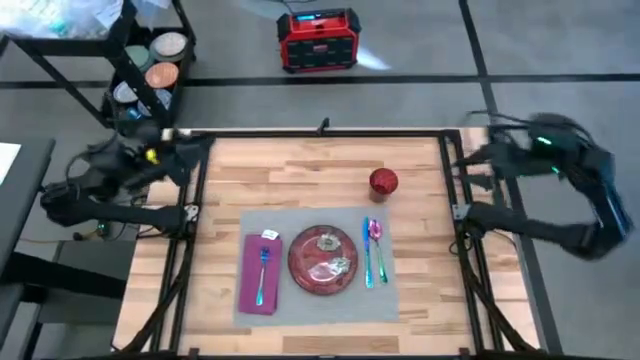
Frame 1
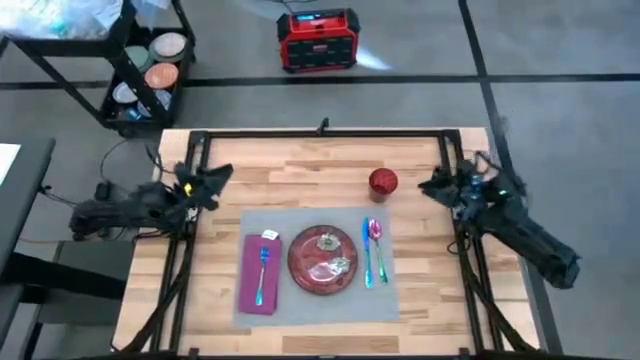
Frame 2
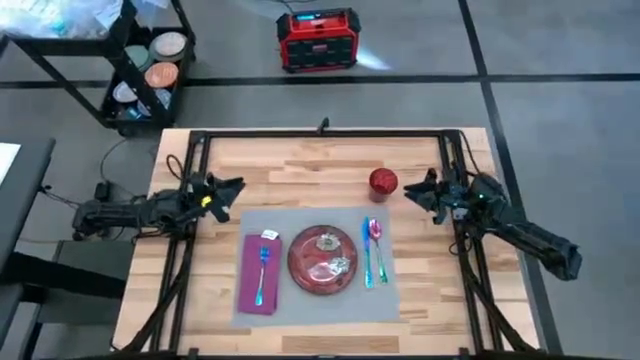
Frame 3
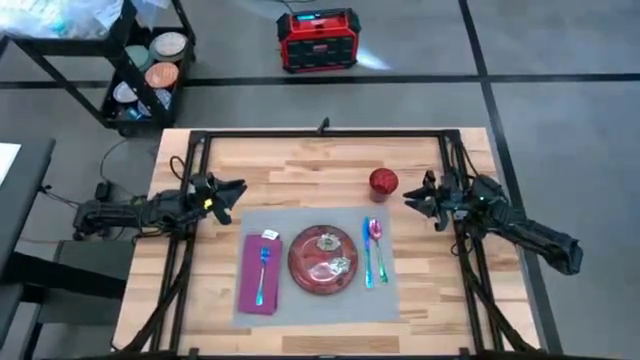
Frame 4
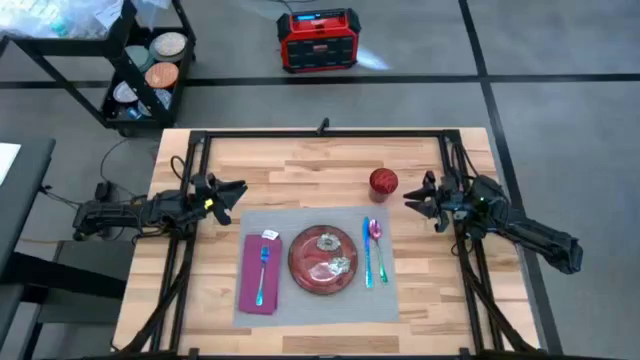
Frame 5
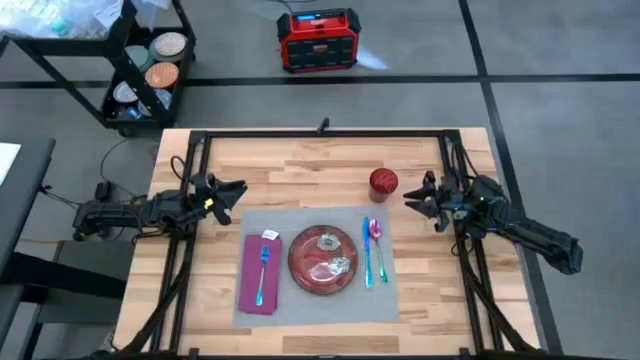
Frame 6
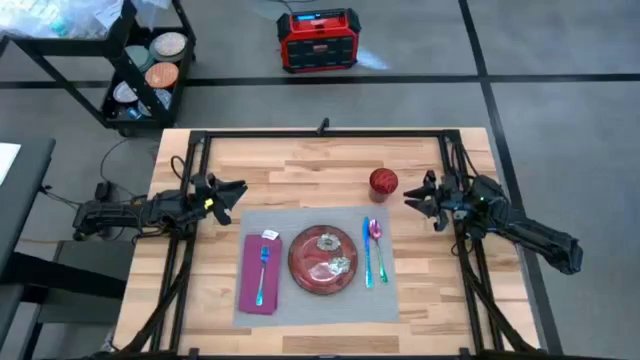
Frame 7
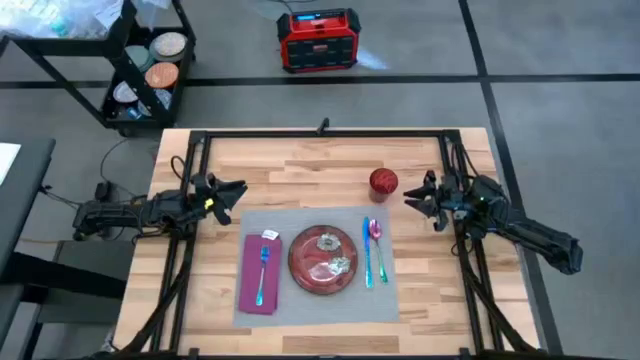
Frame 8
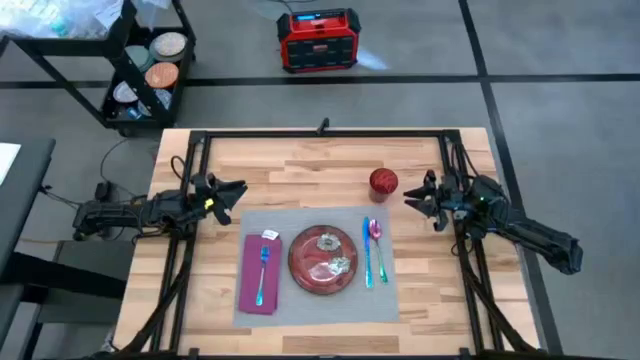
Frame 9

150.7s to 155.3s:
Task: Set table place
Return to Home Position

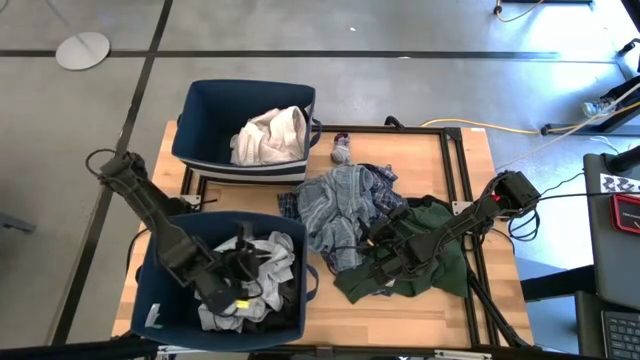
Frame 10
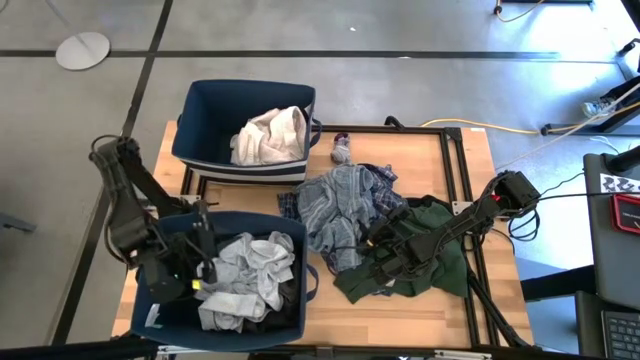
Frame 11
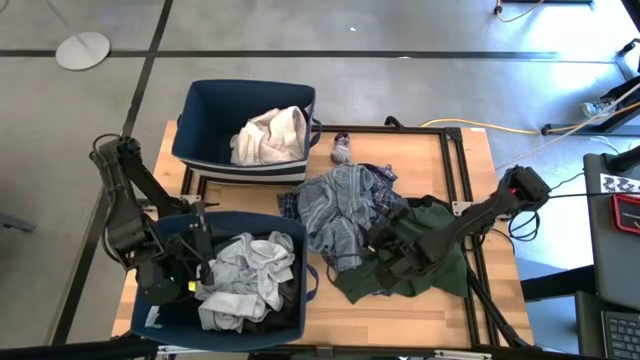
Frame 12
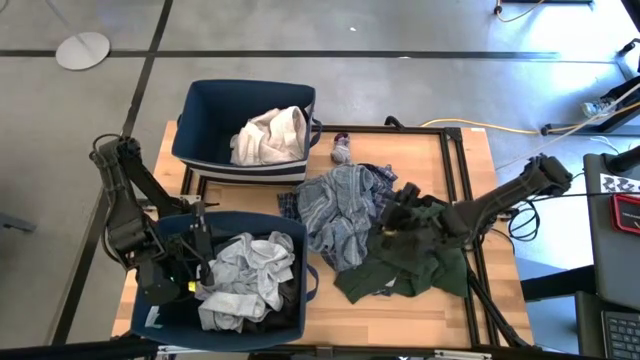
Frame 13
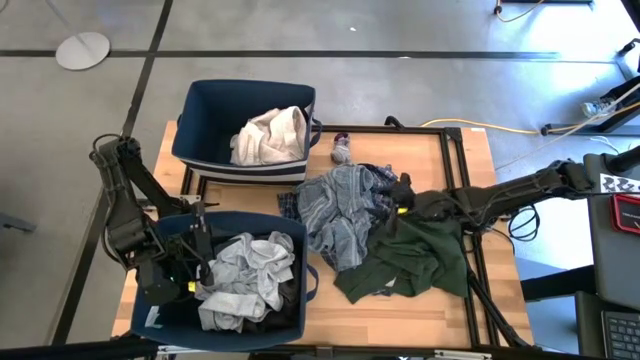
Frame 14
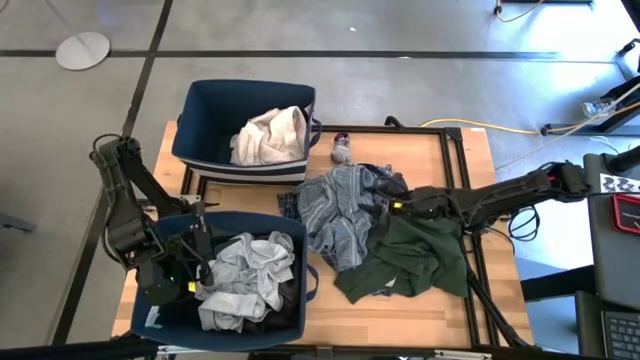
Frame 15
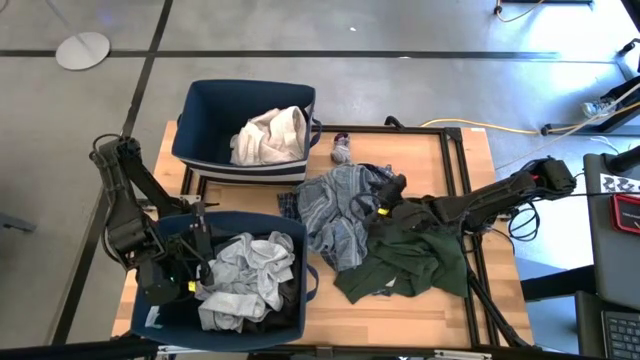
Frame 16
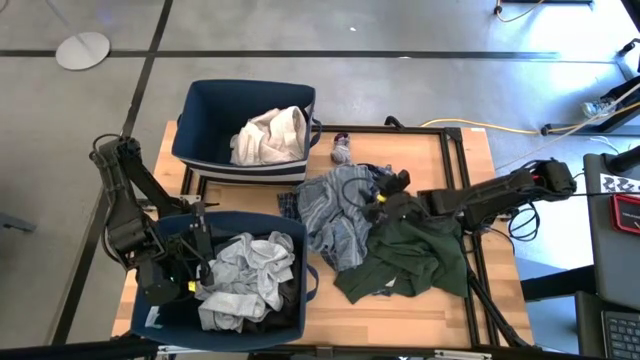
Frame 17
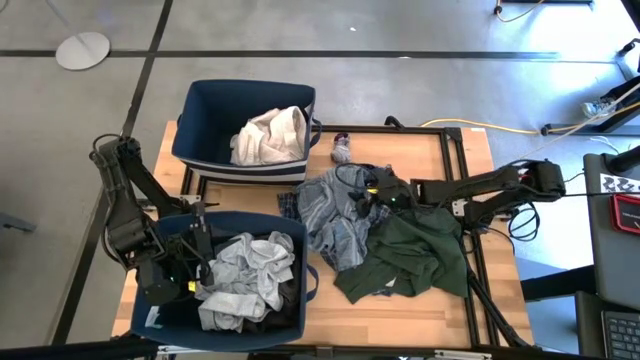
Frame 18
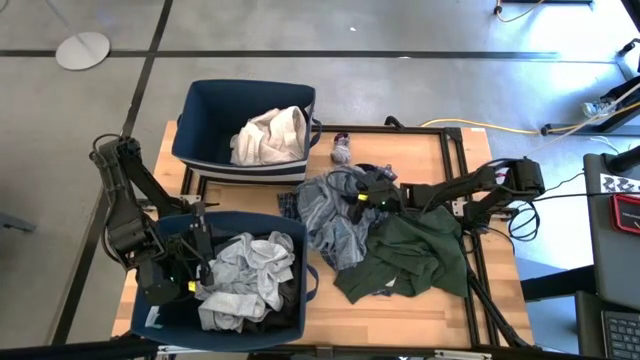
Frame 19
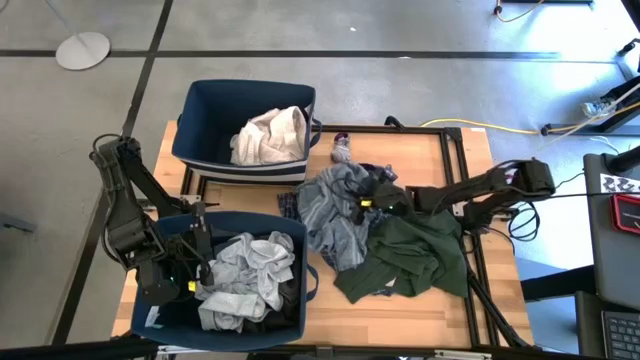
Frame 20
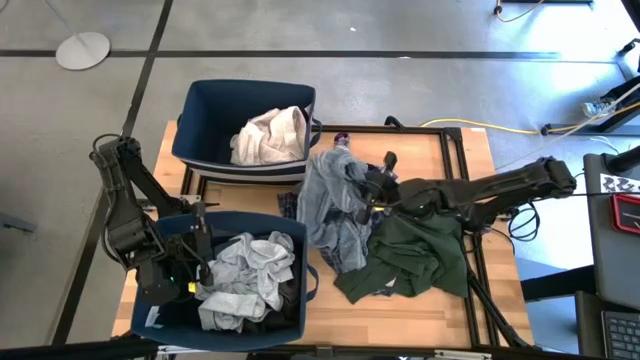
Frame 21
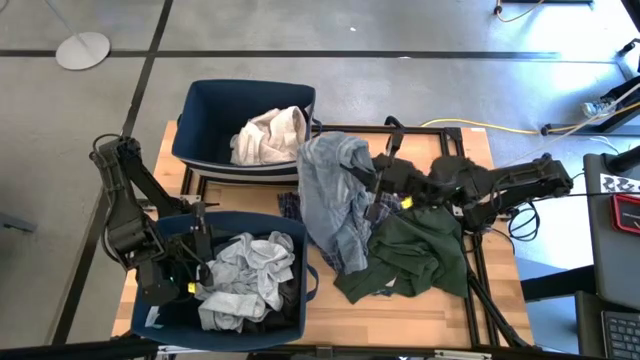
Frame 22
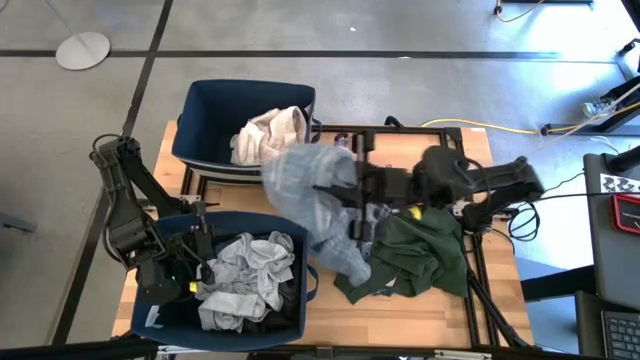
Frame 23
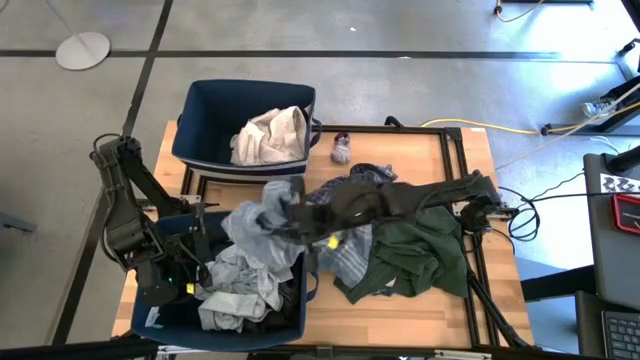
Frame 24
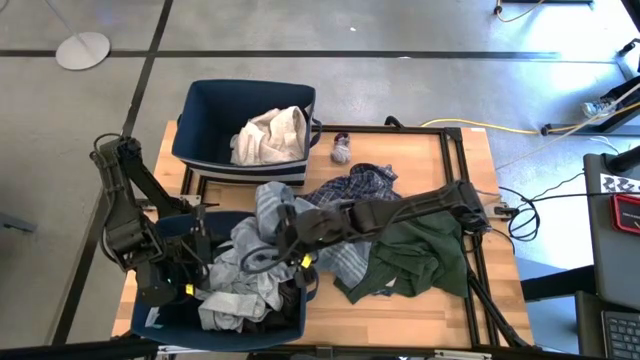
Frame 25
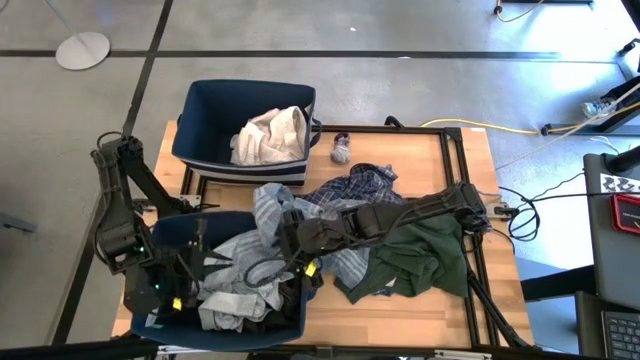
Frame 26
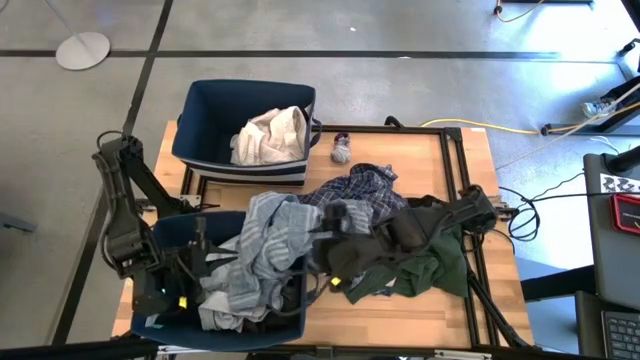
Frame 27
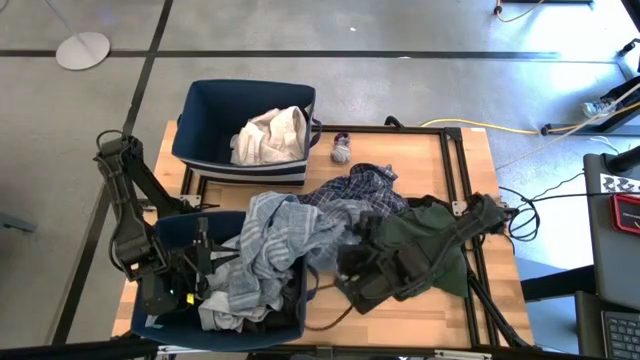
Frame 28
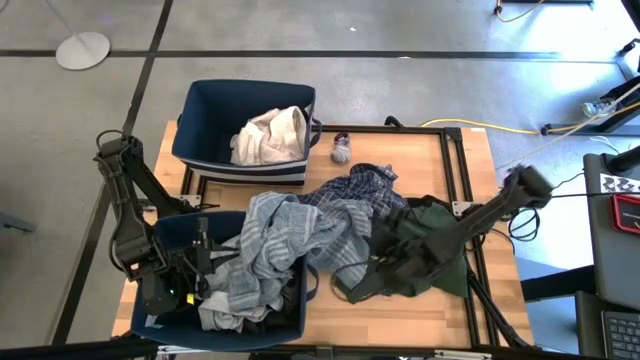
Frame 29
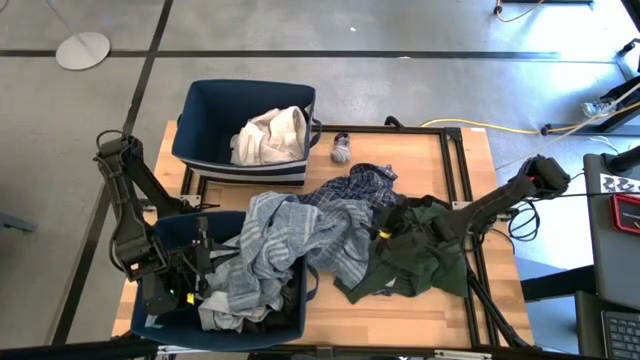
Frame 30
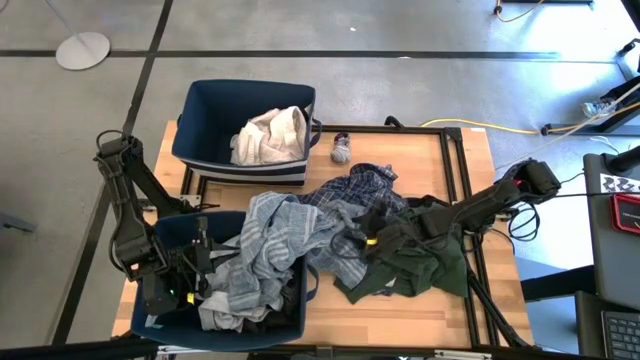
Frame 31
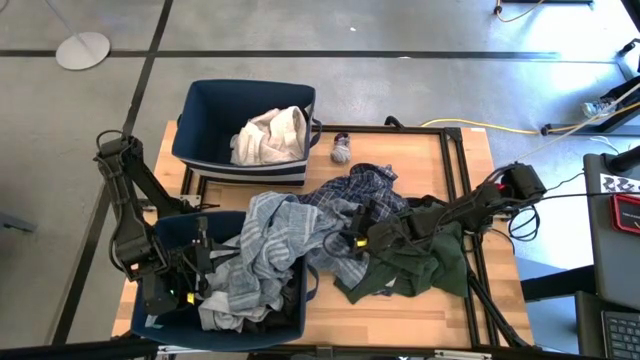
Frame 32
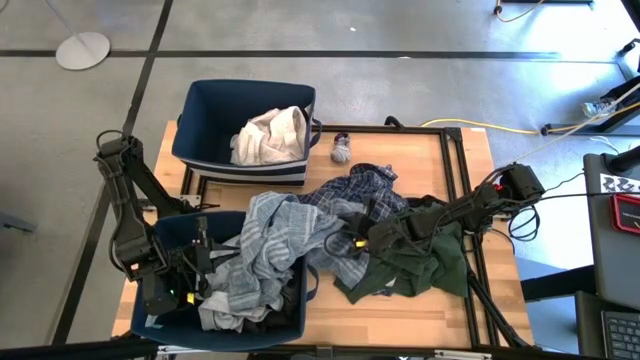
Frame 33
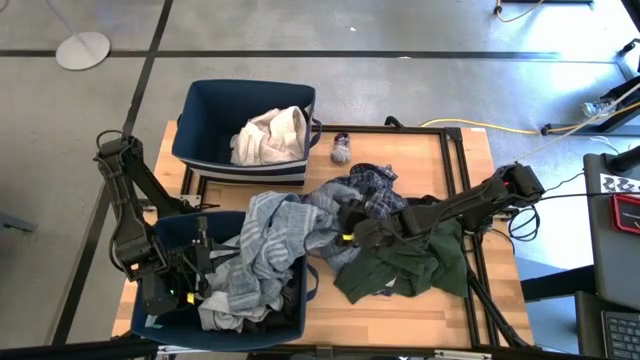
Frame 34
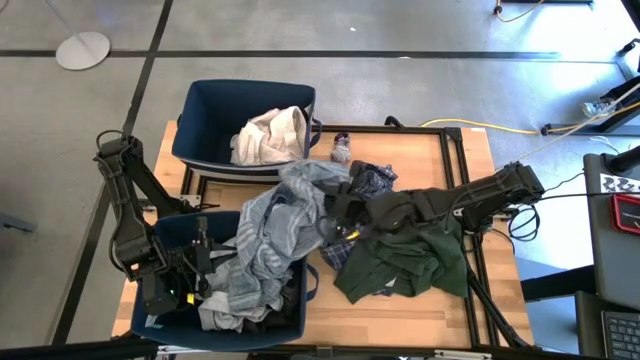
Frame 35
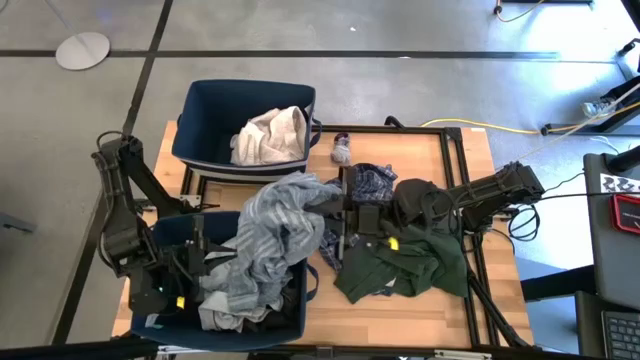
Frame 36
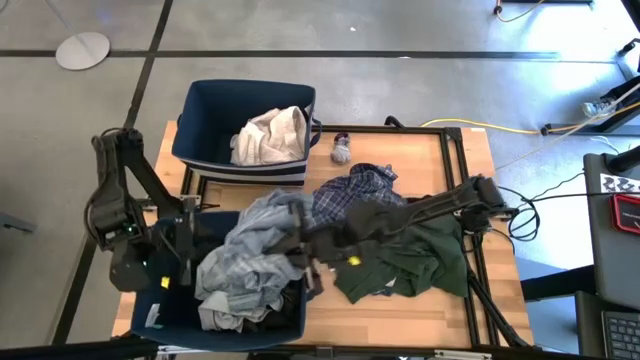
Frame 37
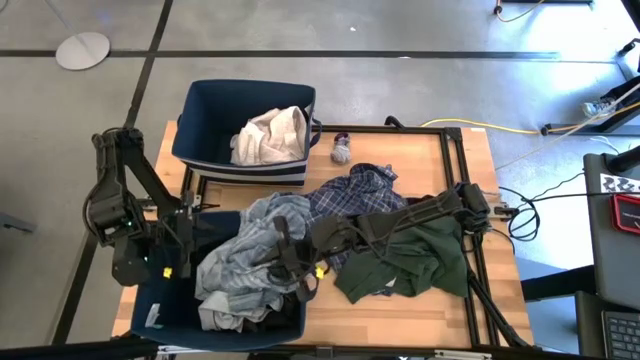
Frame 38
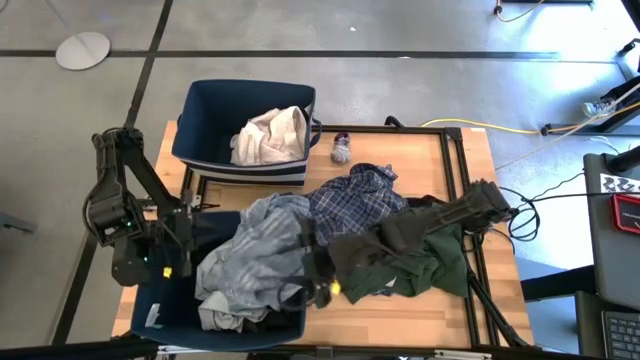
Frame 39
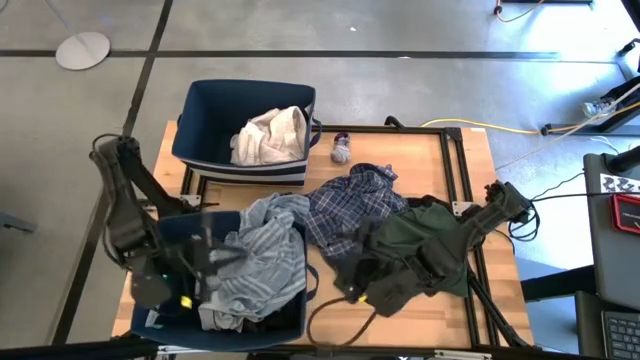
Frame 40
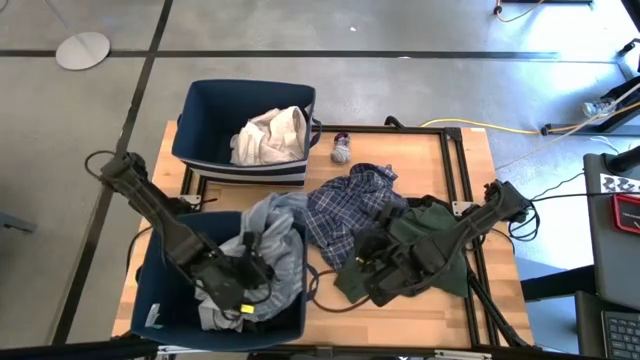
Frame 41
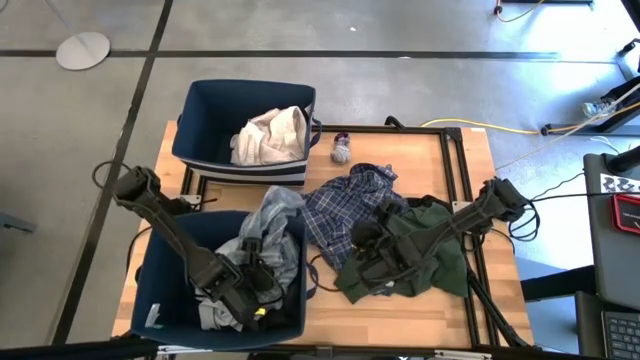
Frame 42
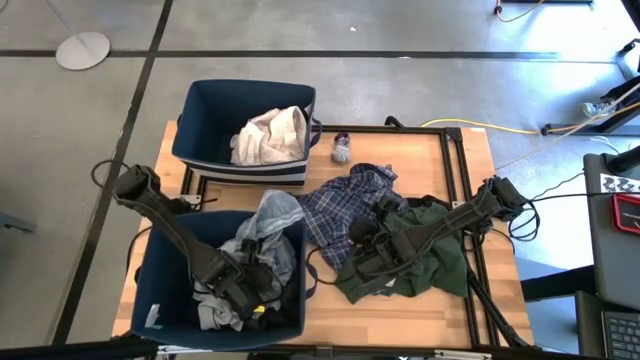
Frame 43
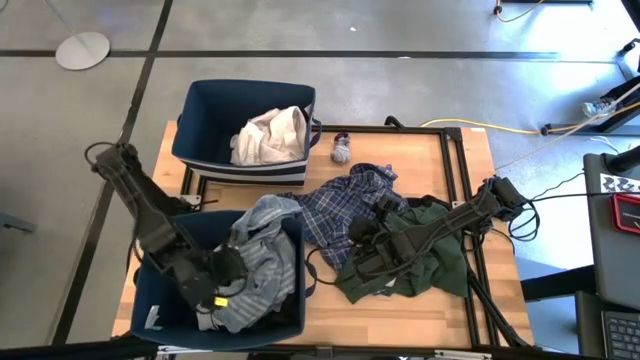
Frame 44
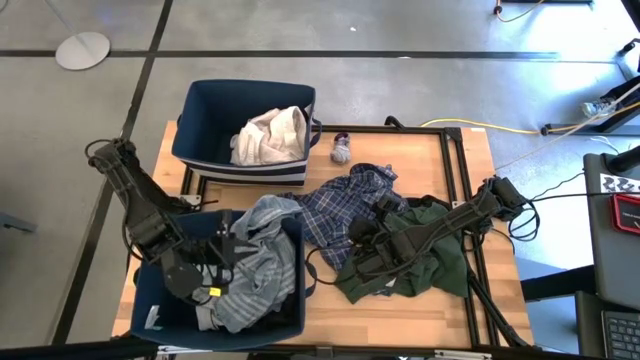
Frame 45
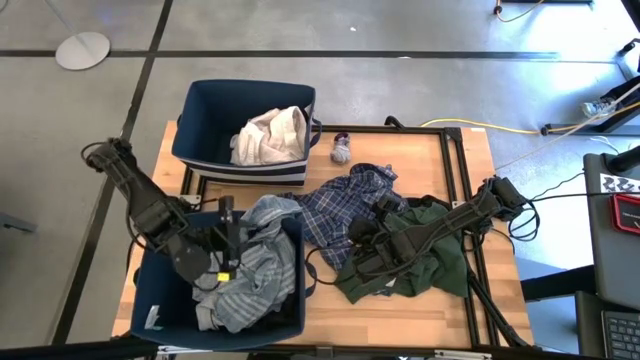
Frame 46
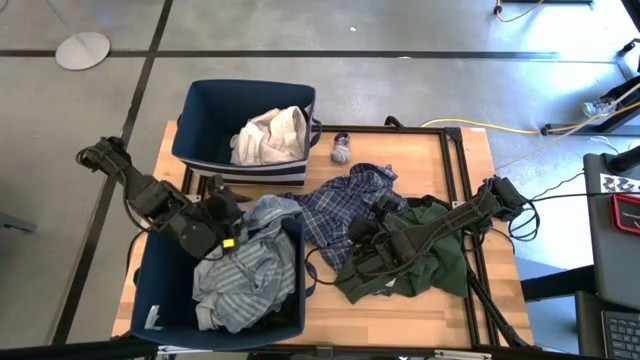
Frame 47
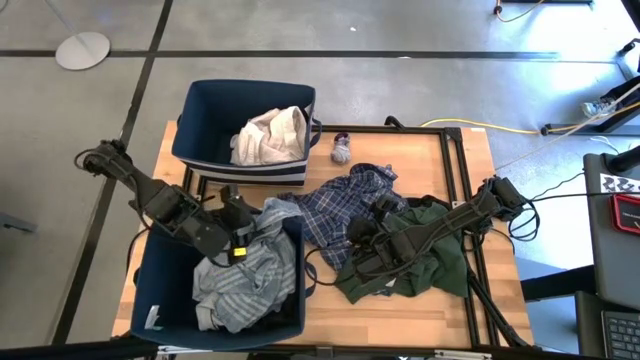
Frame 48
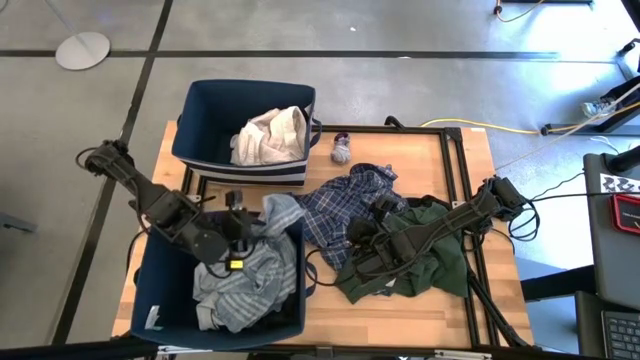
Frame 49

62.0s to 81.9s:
Task: Sort clothes
Put the light blue long sleeve into the bottom blue laundry organizer
